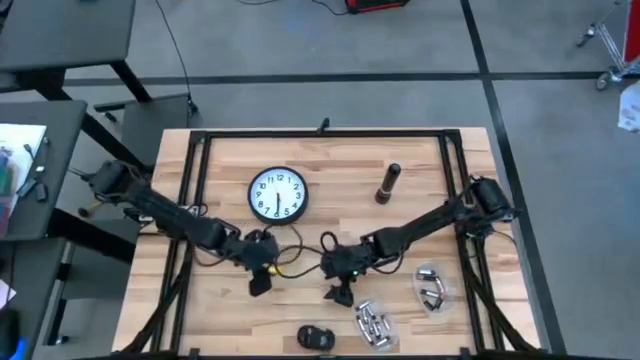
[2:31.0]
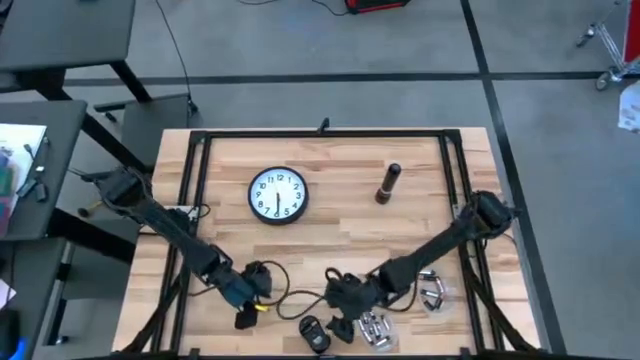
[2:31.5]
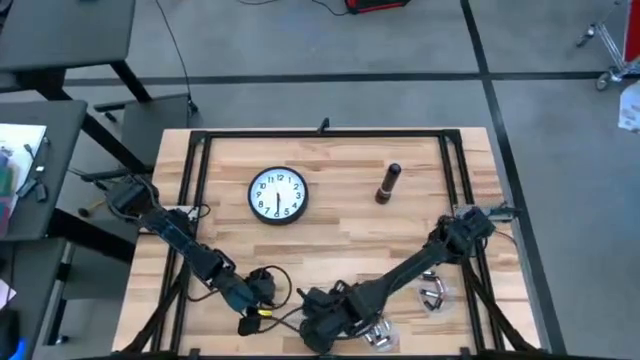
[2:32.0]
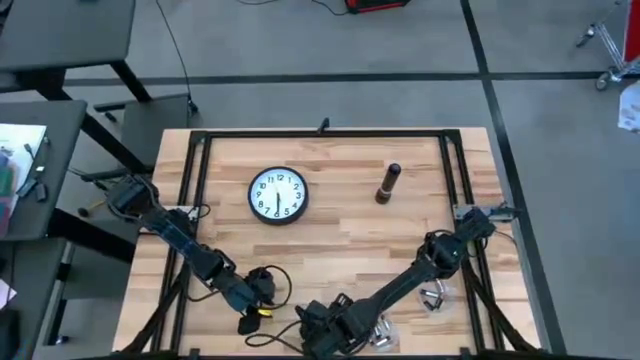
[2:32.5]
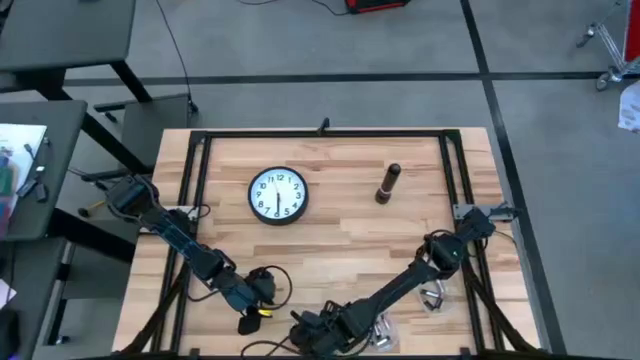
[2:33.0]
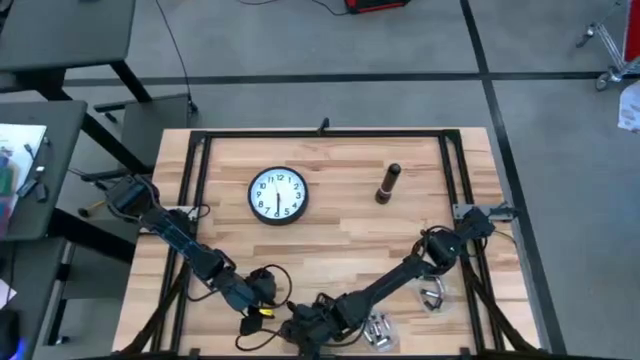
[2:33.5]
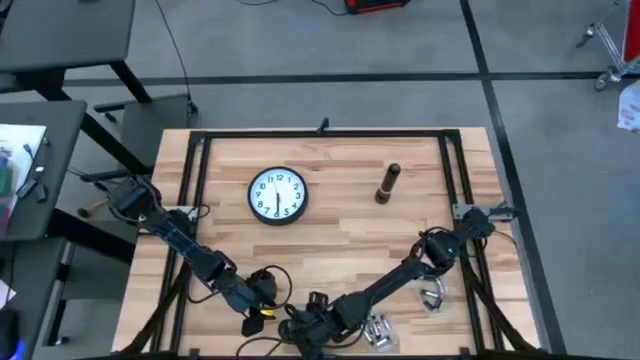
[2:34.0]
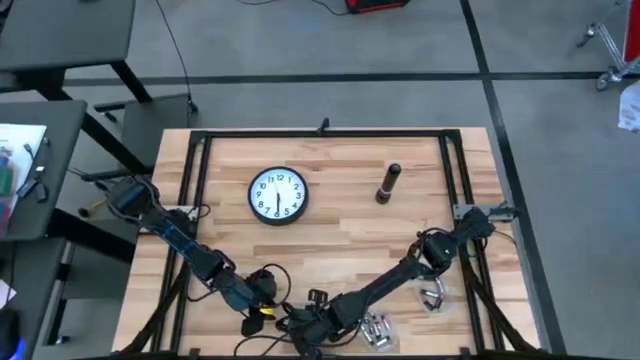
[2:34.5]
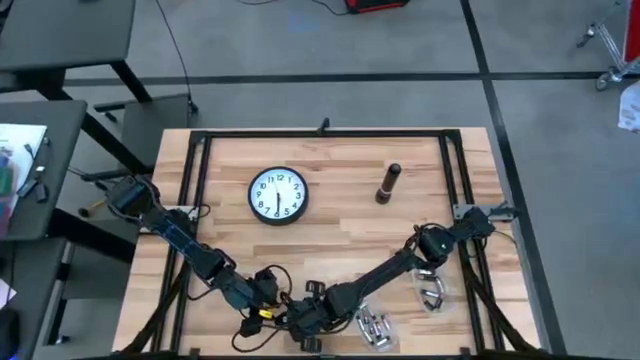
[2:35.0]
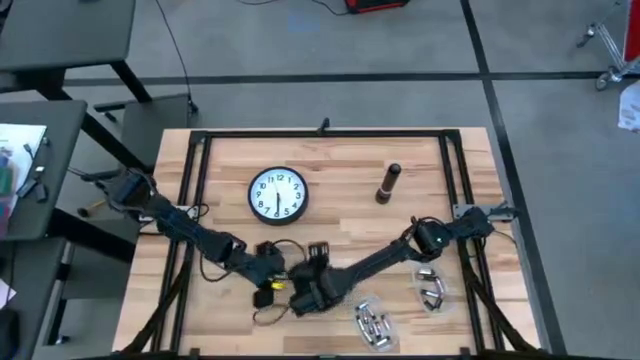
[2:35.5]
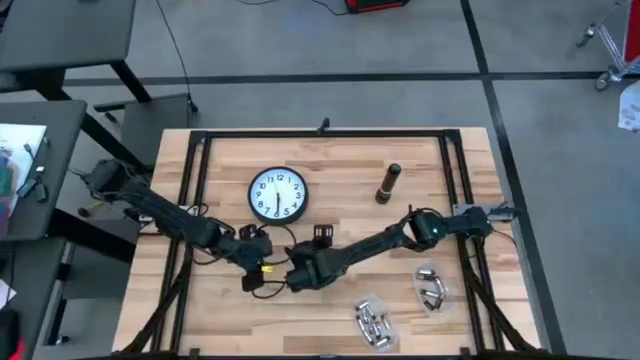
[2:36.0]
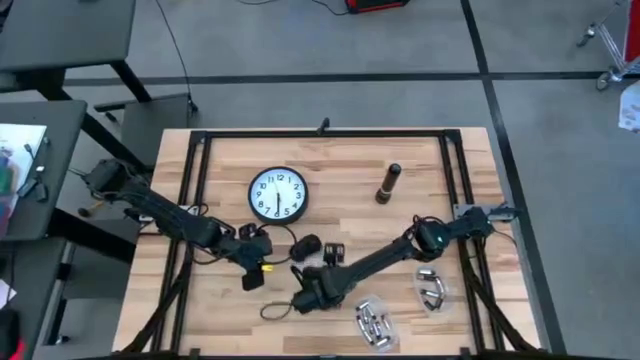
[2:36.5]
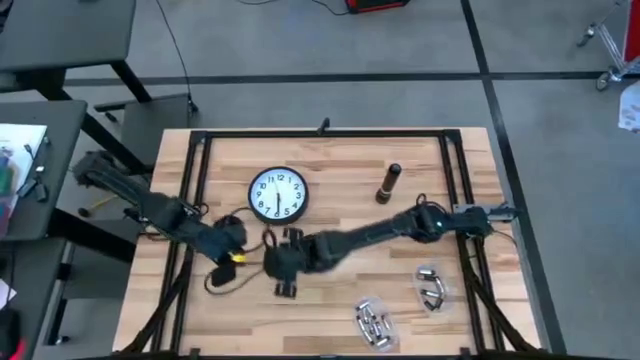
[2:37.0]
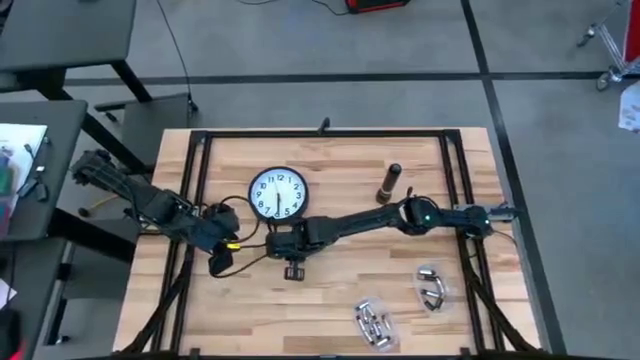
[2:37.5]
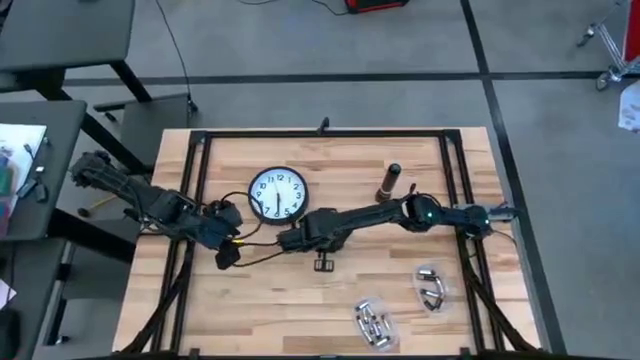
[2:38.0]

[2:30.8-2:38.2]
Task: Insert battery
Adjust the black computer mouse

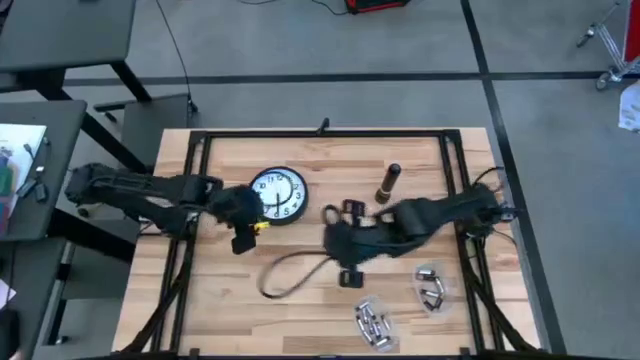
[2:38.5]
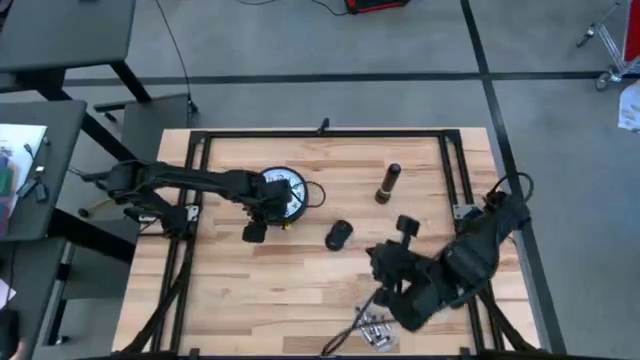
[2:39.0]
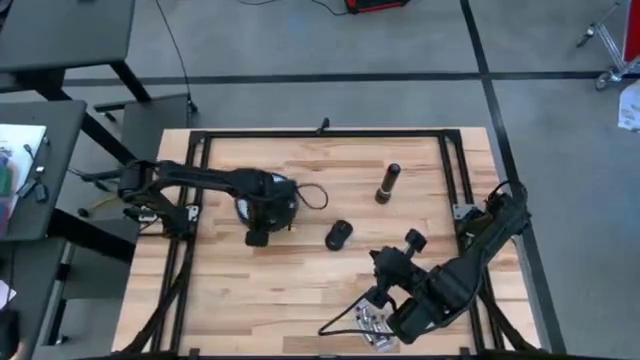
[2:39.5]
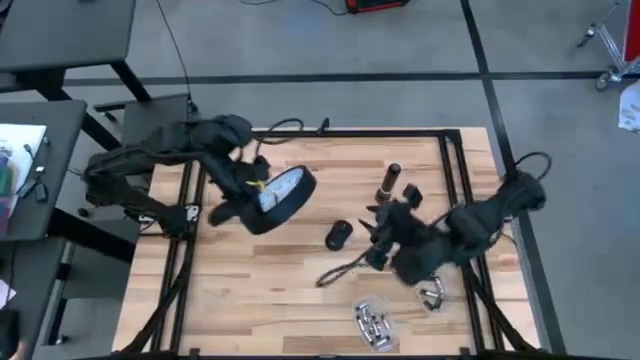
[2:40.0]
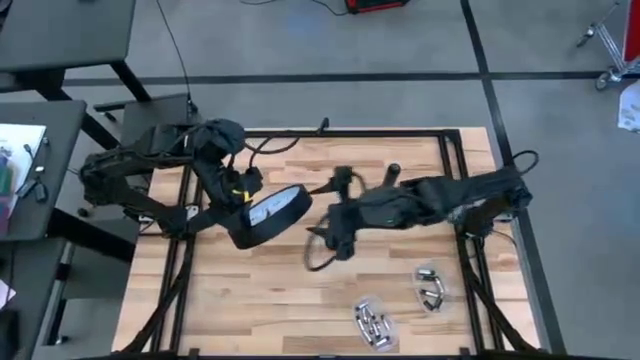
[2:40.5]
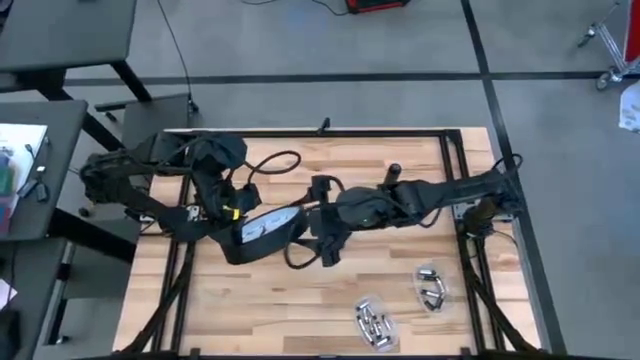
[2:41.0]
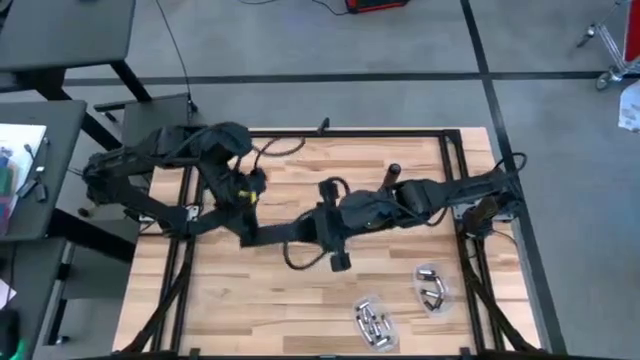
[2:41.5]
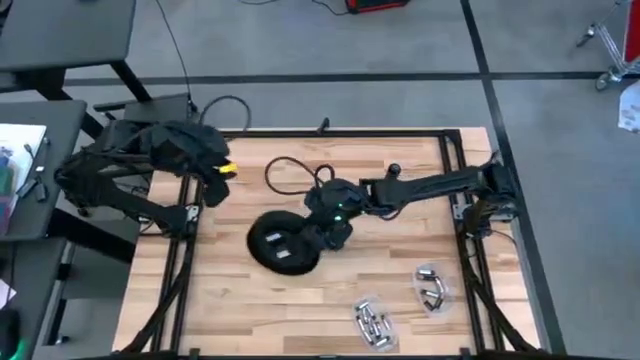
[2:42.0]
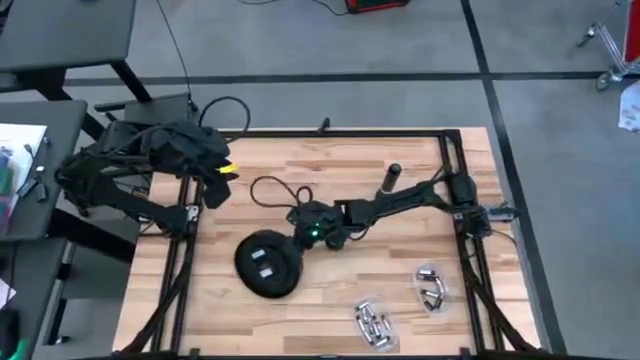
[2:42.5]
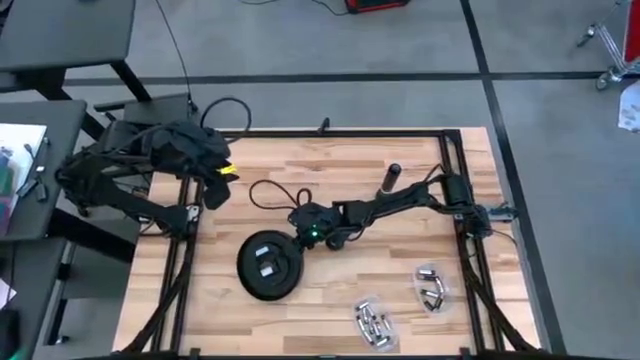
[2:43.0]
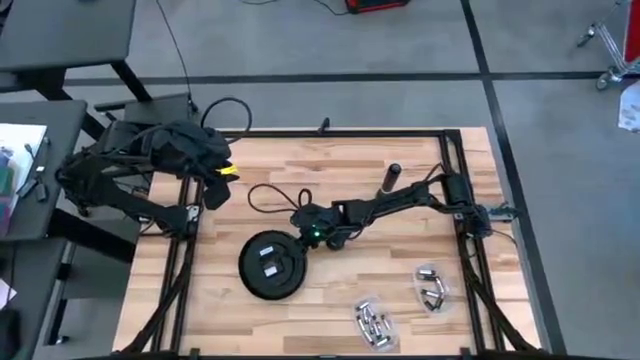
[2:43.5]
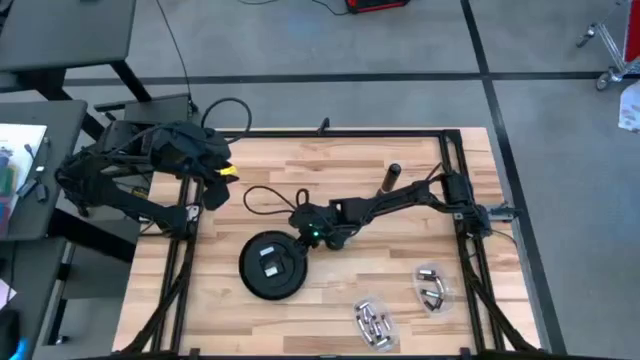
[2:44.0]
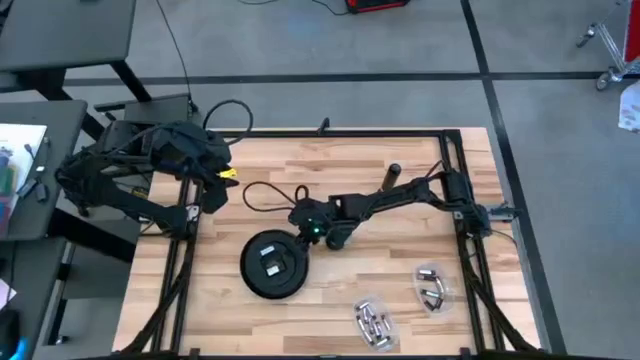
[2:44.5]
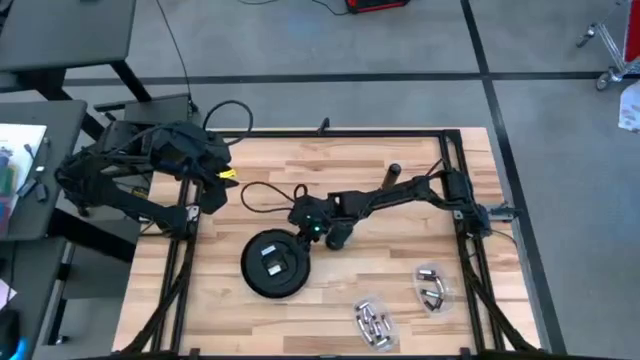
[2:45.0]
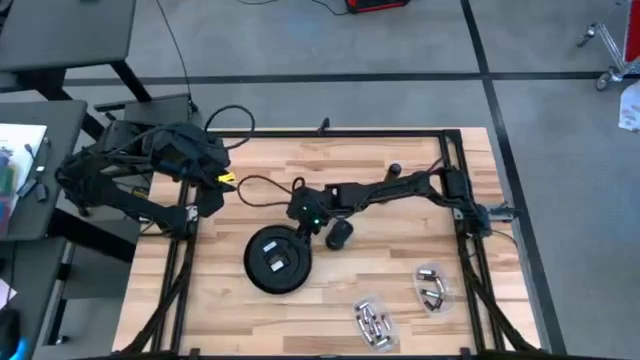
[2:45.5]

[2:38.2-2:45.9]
Prepare the white wall clock

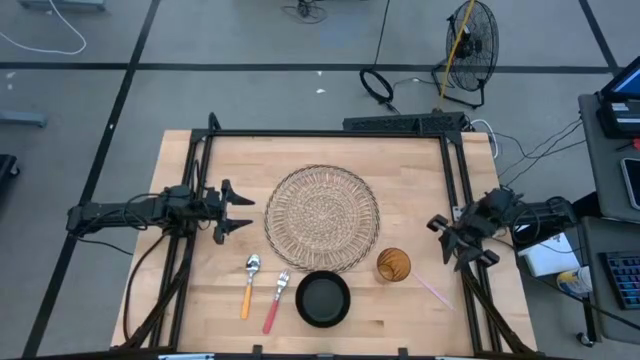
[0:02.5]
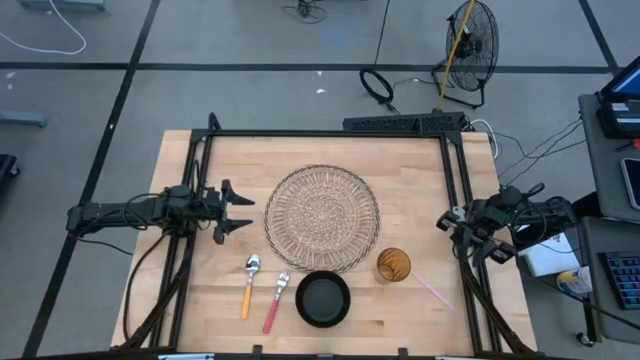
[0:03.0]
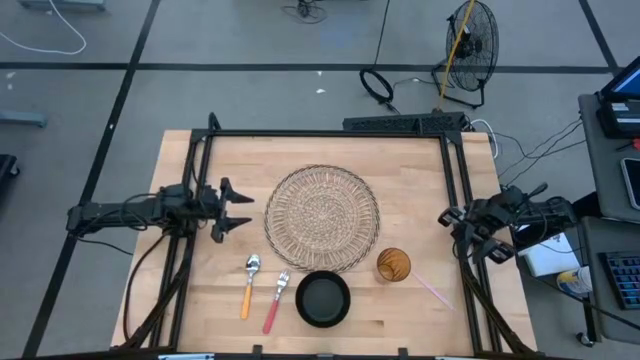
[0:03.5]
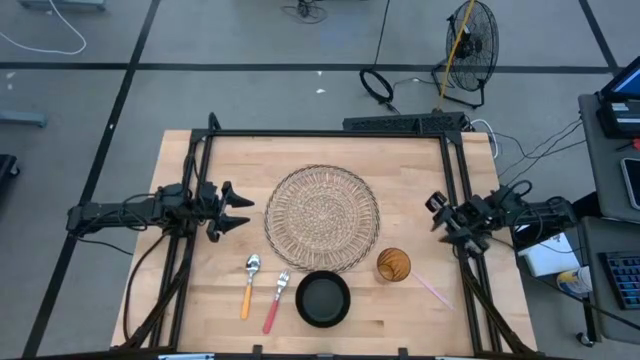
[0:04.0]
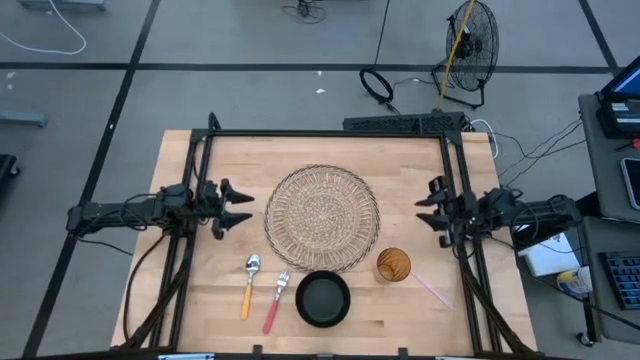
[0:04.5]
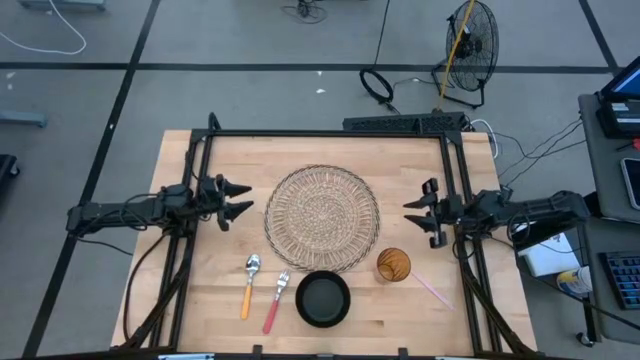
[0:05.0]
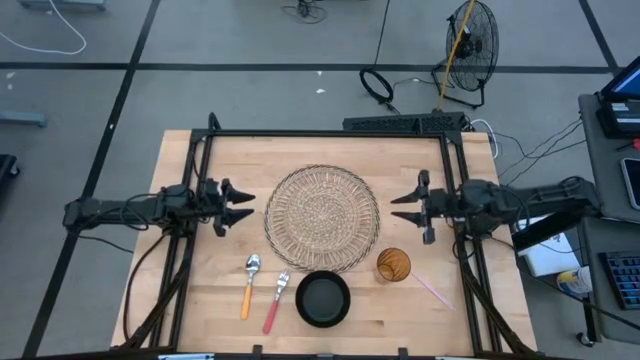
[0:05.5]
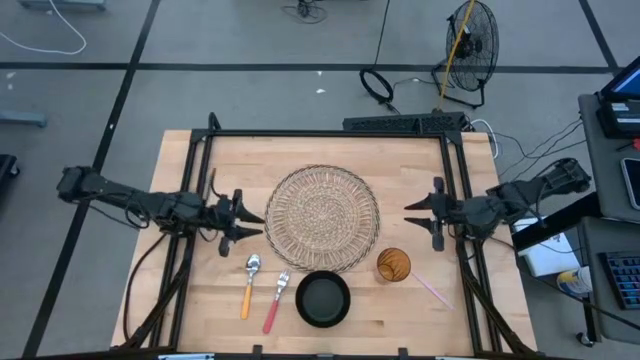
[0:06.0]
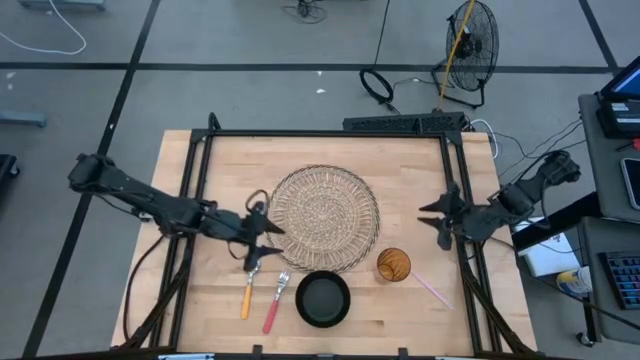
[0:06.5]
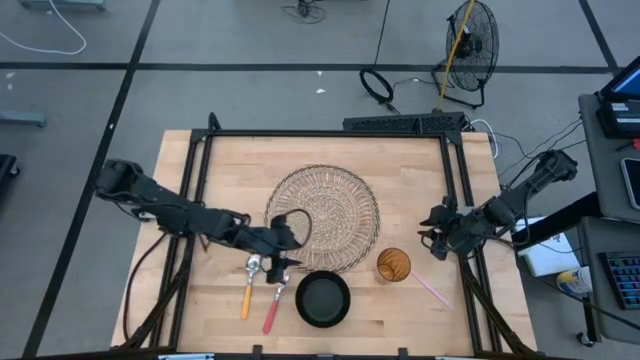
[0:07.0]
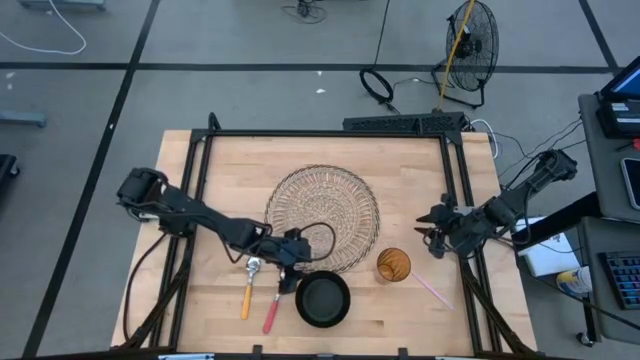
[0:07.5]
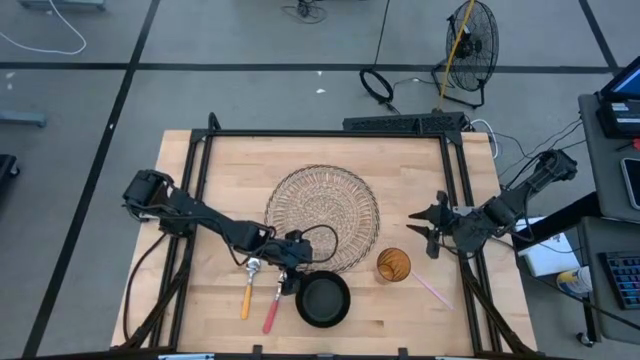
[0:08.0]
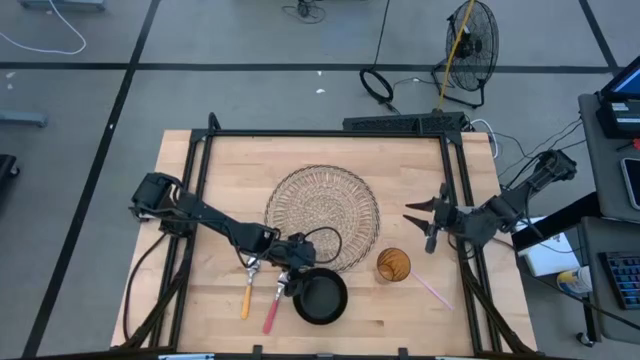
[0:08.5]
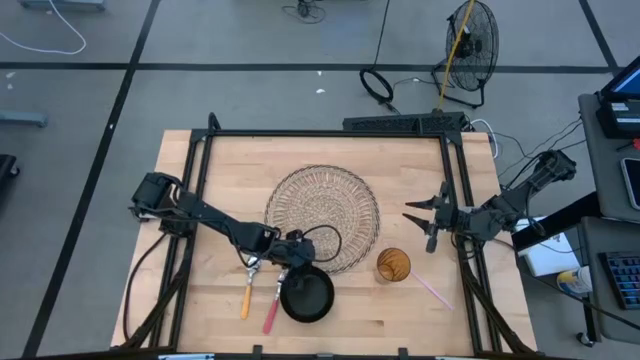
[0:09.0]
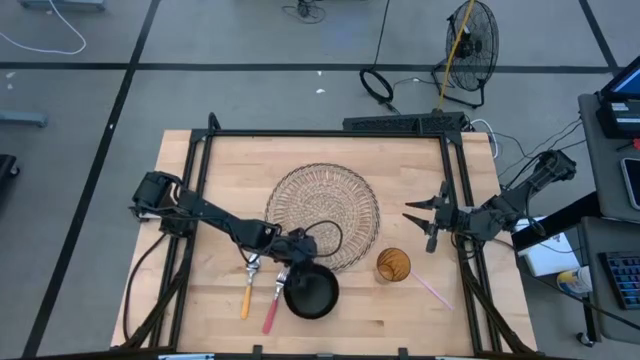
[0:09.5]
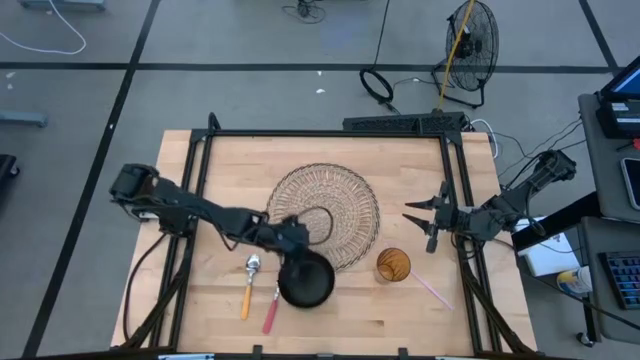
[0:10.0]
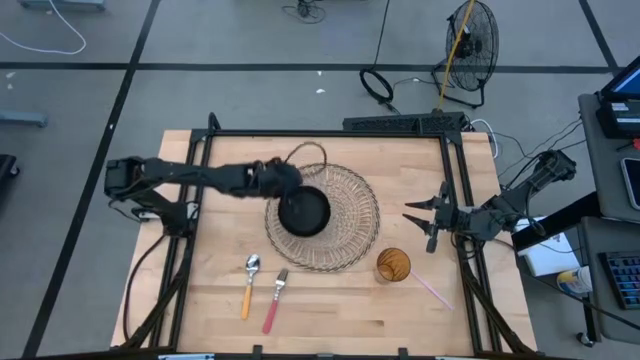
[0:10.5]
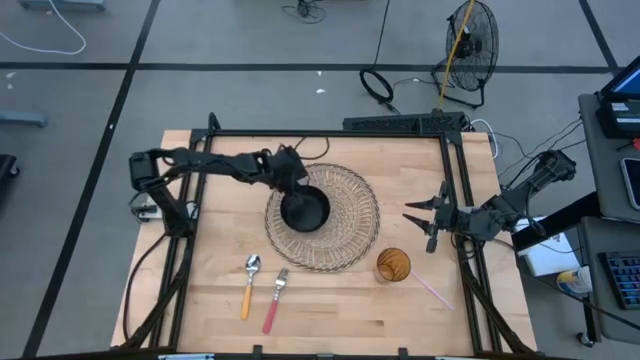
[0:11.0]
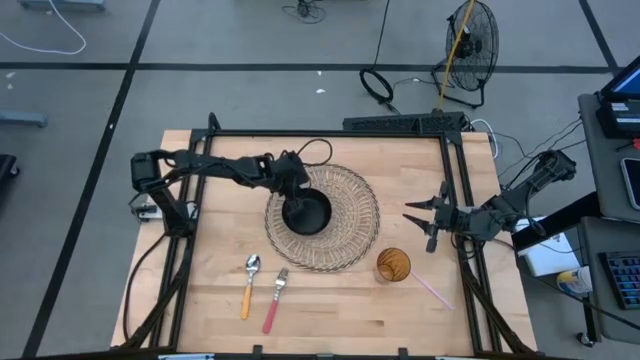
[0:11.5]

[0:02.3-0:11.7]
Task: Pick & Place Utensil
Put the black bowl on the left of the brown mat
